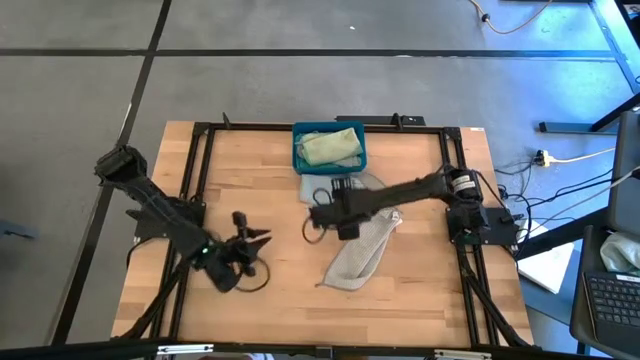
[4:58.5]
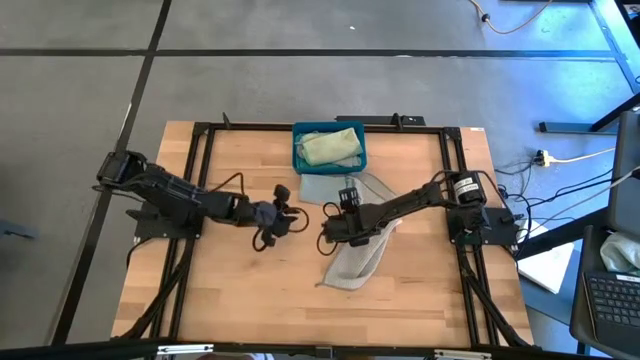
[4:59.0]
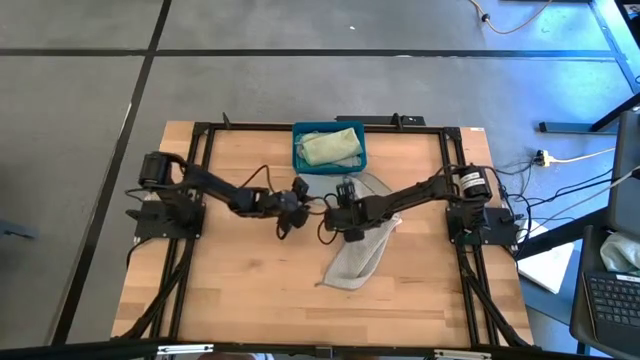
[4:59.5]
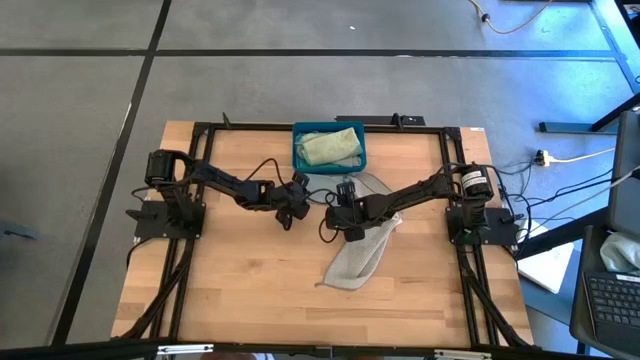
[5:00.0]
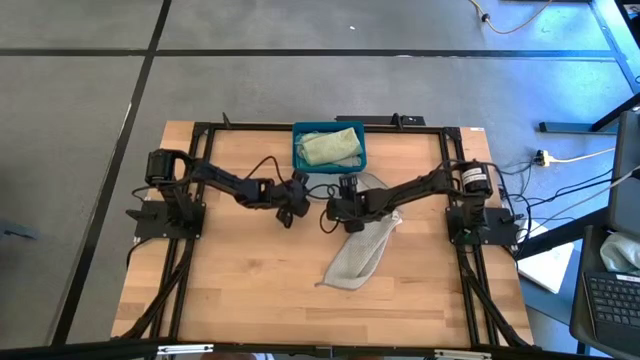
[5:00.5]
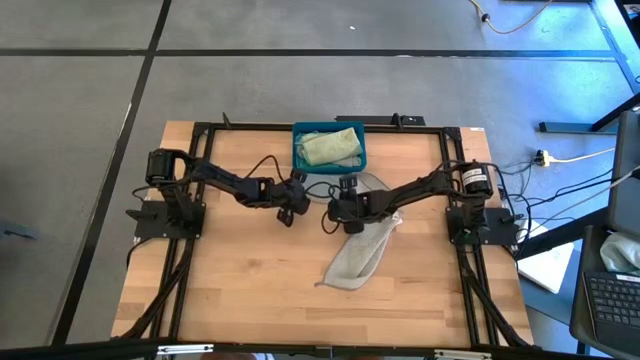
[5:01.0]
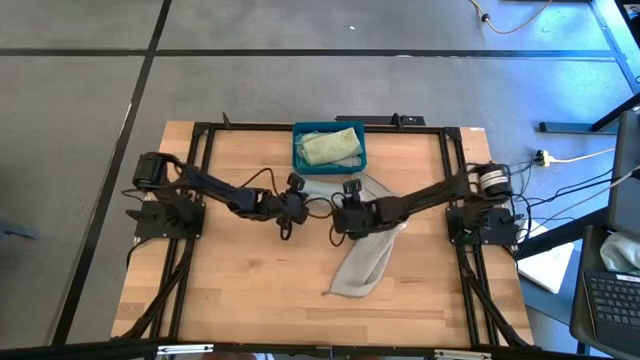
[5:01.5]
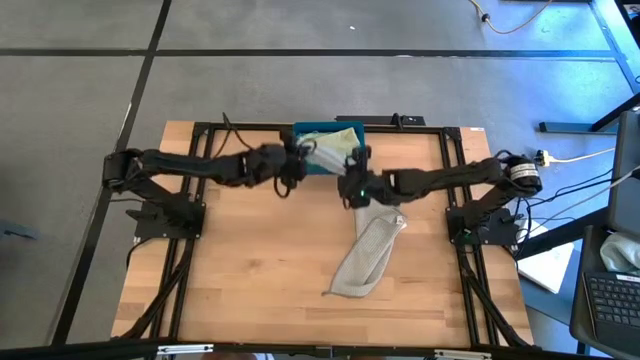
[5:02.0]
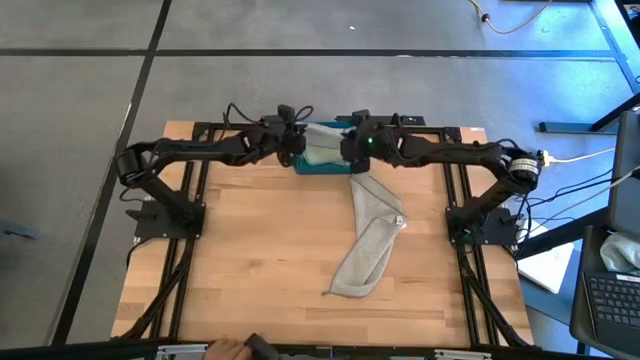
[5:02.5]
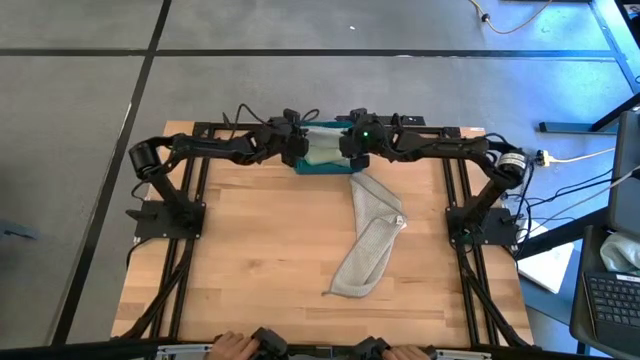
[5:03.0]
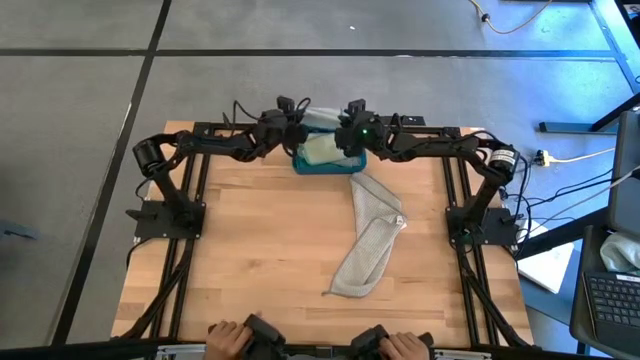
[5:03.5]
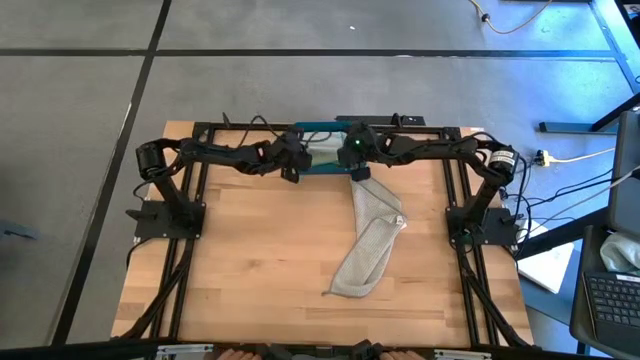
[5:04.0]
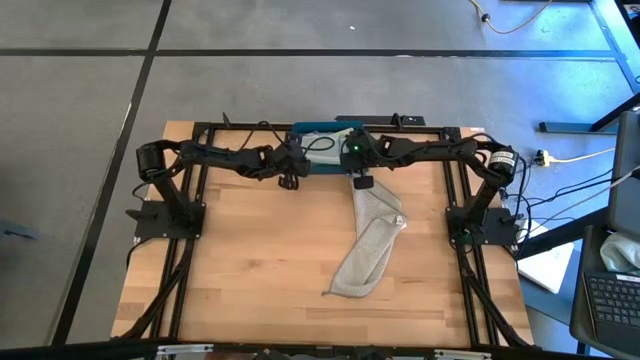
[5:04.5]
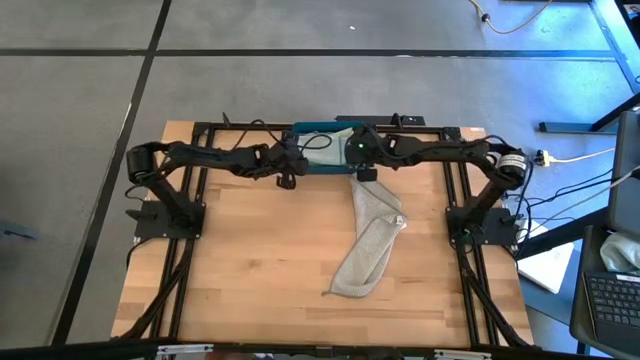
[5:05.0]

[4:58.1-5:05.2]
Task: Fold microfiber towels
Put the folded light blue towel into the blue bin

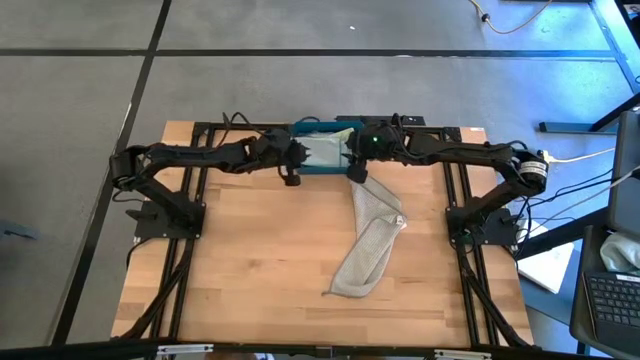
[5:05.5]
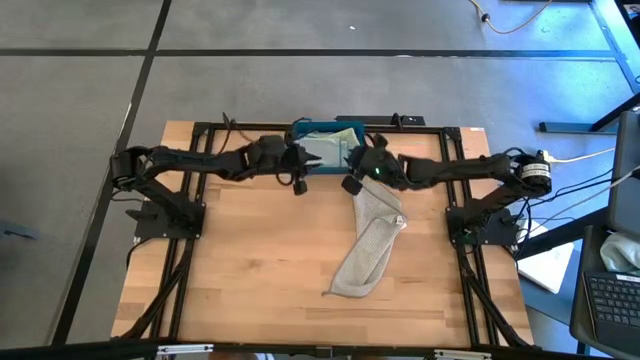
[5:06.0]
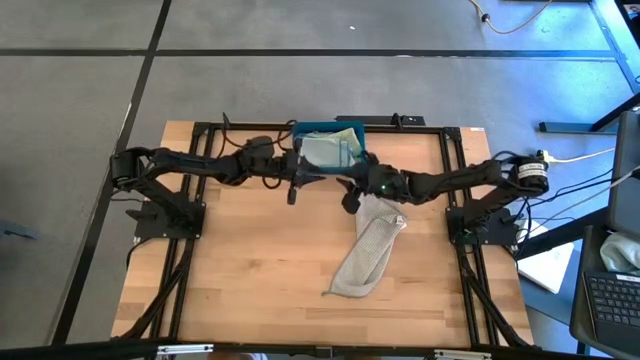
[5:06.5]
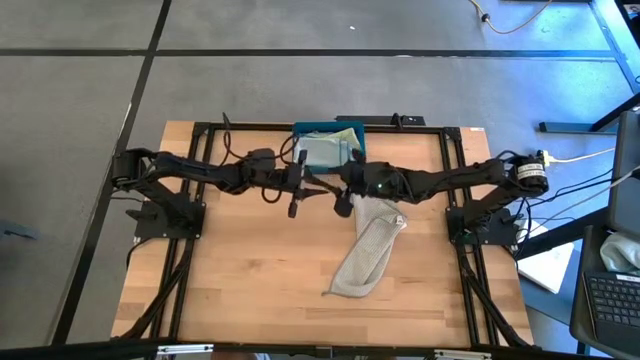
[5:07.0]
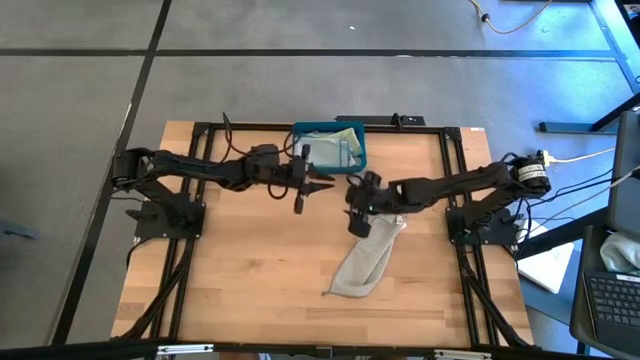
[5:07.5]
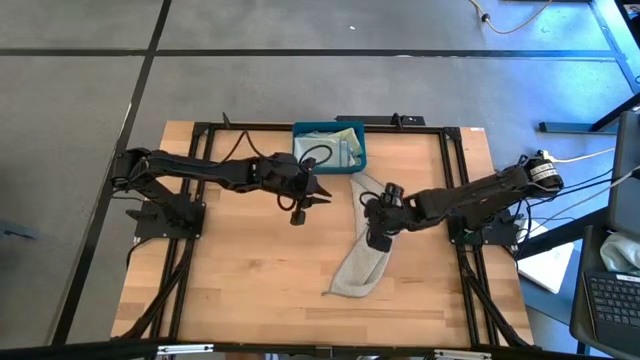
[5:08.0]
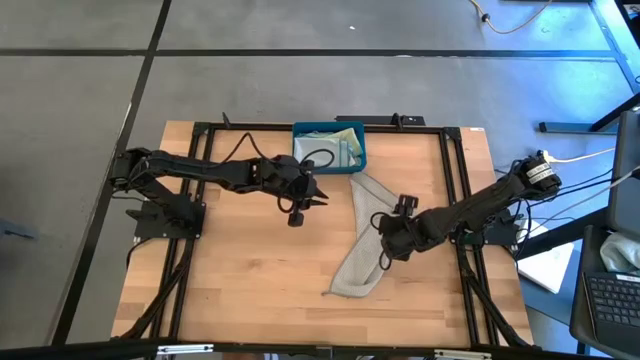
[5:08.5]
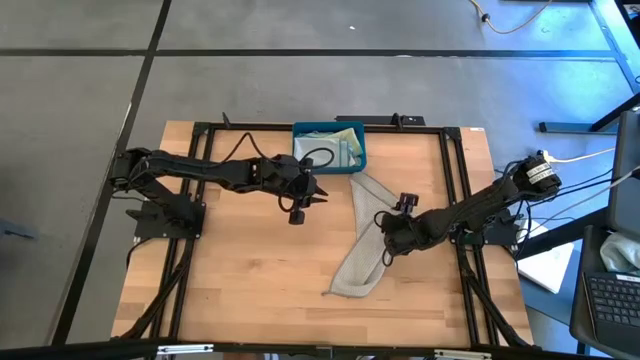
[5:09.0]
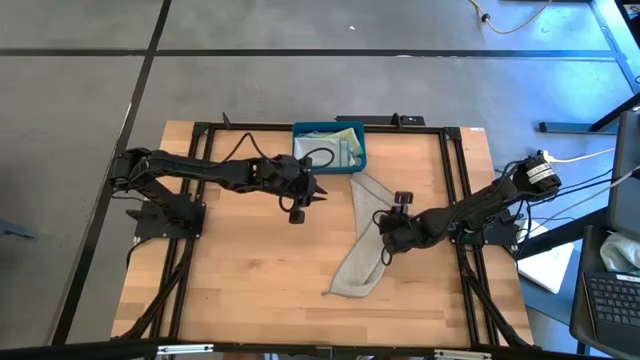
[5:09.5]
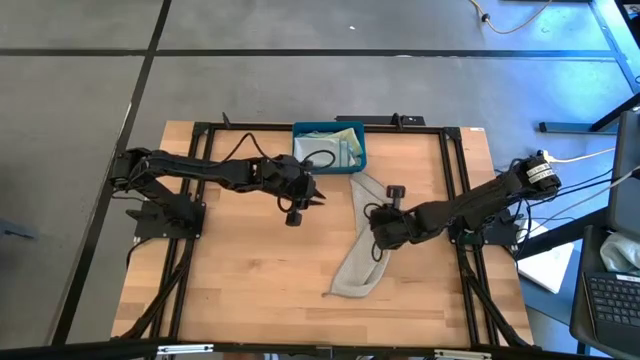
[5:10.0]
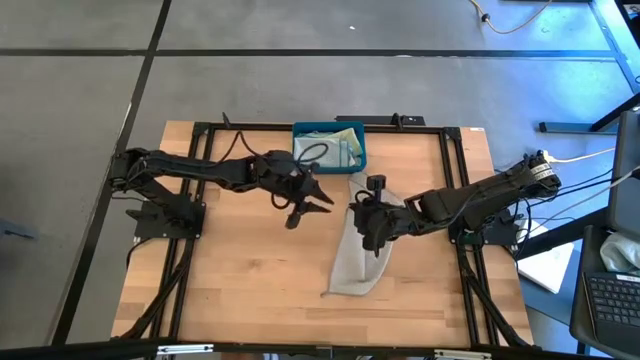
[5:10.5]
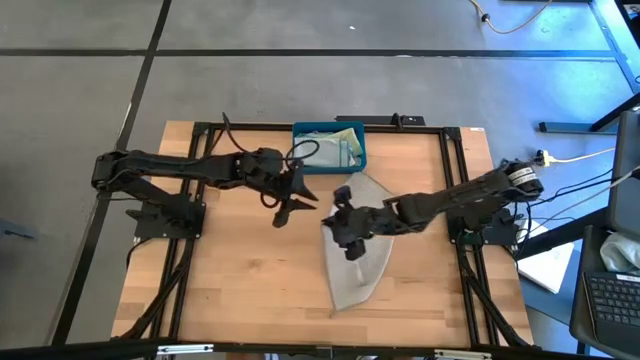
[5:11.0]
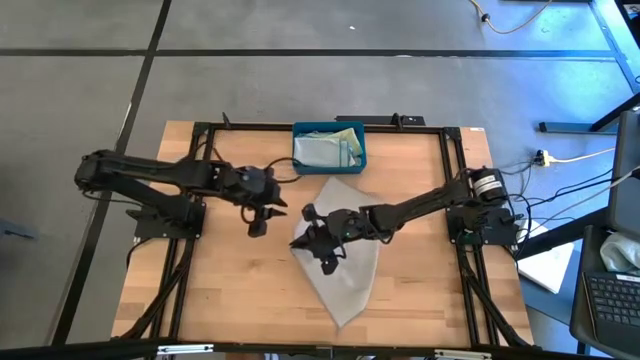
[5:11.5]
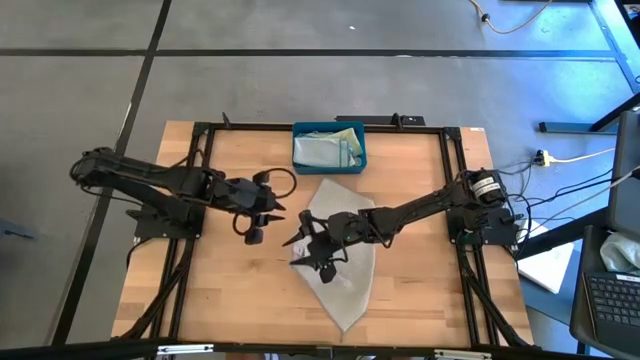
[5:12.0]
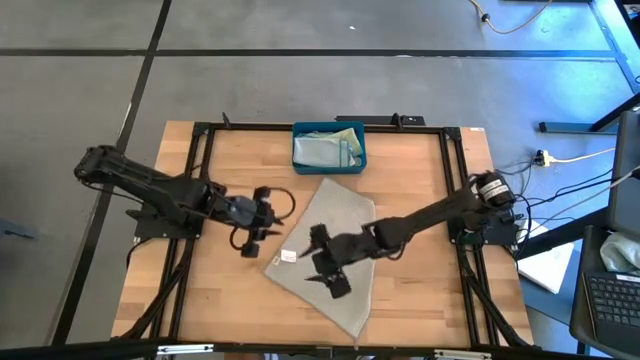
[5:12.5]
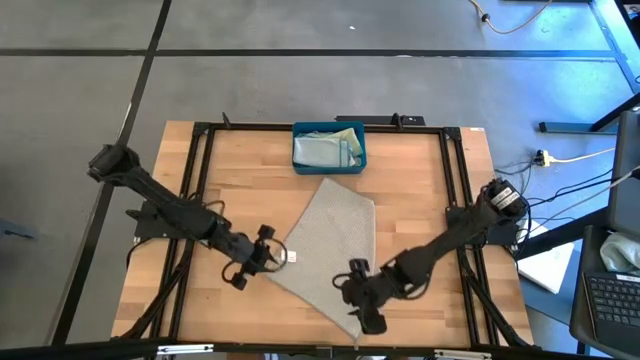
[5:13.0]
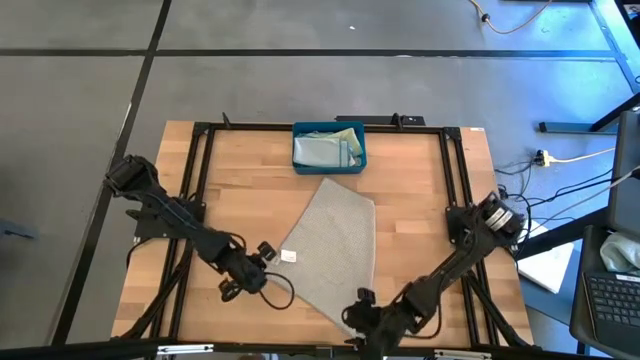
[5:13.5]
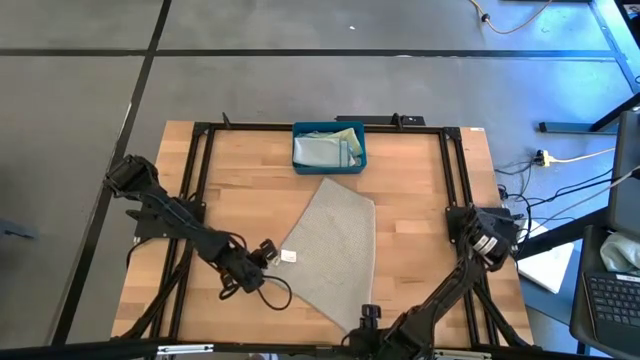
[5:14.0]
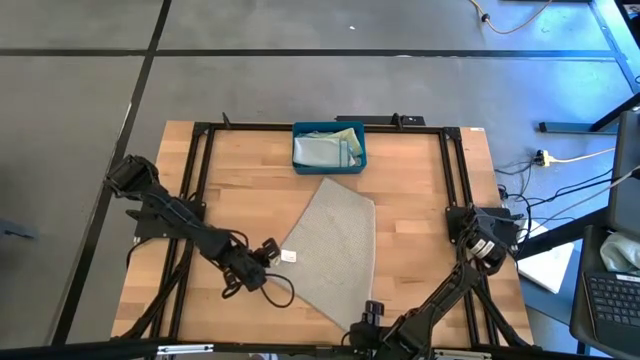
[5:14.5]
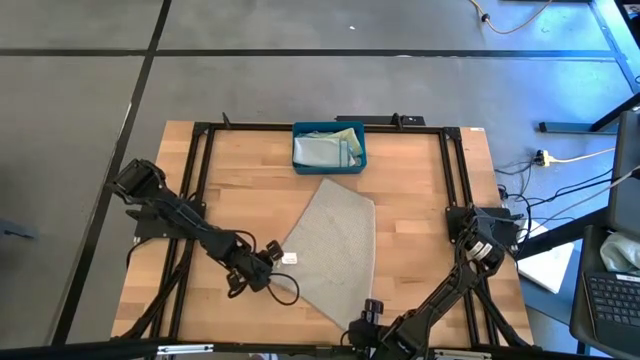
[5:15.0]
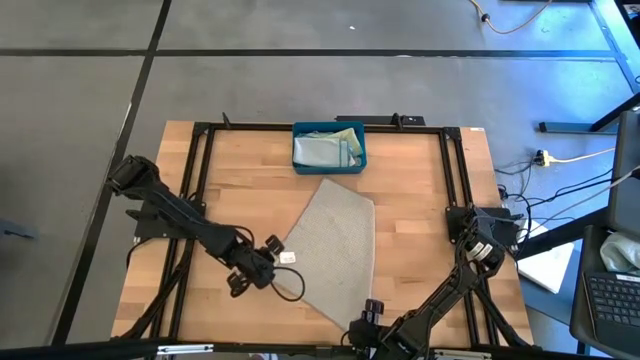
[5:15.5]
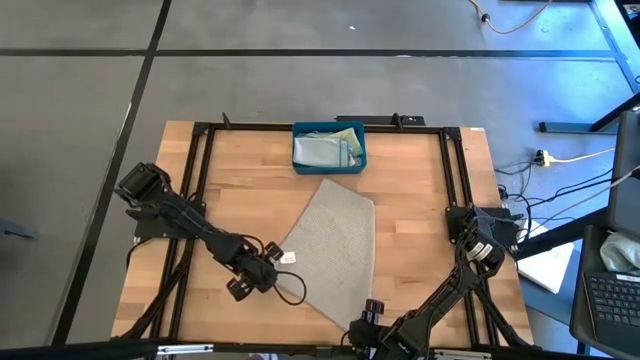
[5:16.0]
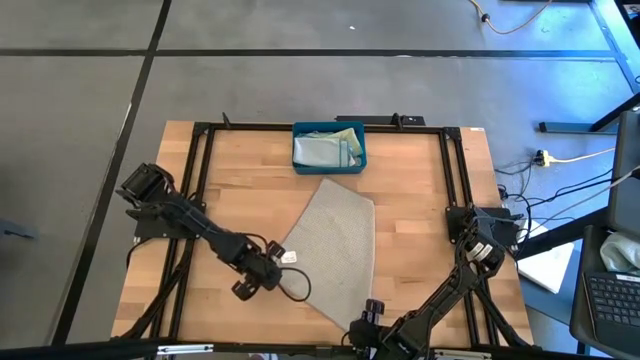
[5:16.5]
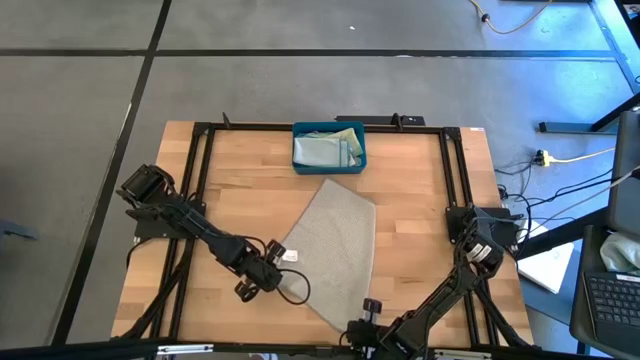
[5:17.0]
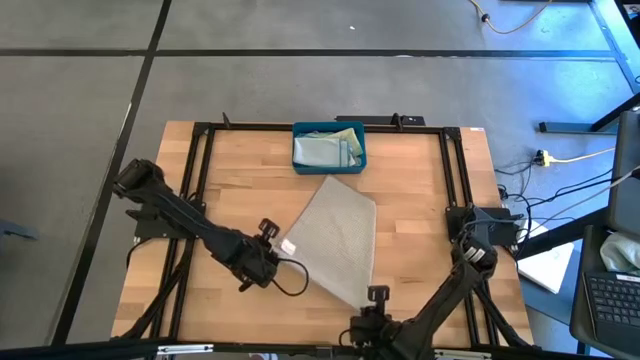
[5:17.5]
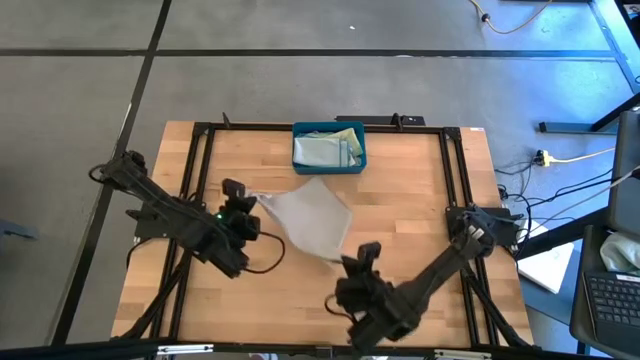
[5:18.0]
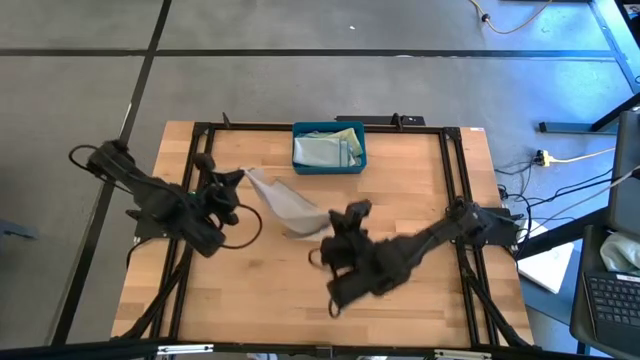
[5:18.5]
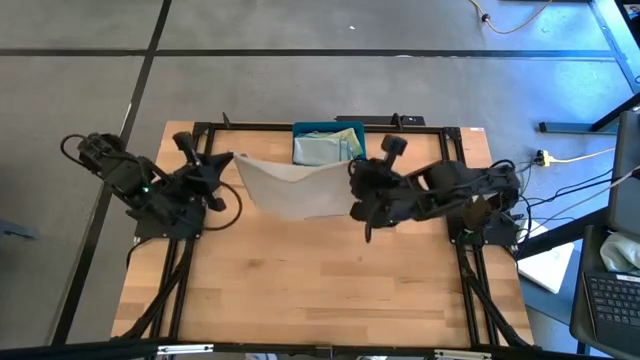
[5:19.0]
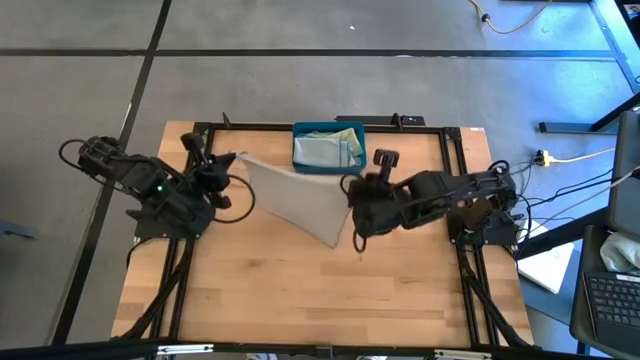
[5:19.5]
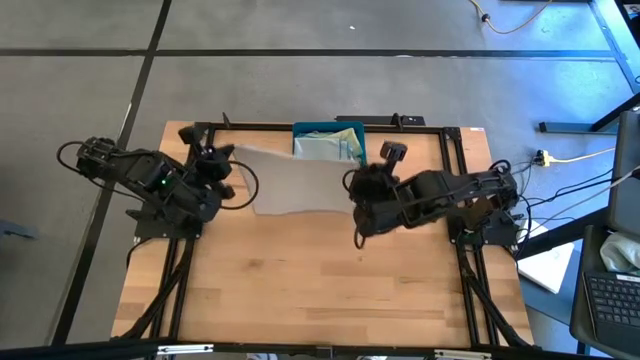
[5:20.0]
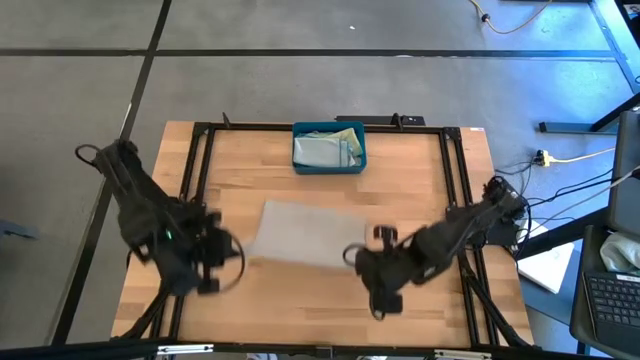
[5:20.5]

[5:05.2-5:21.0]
Fold the gray towel
